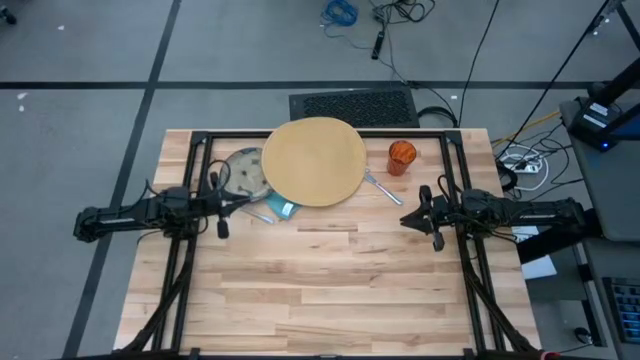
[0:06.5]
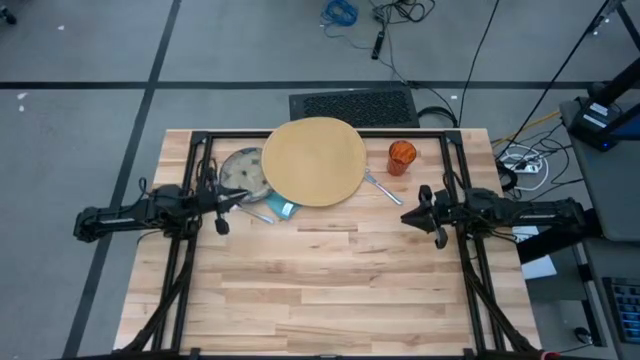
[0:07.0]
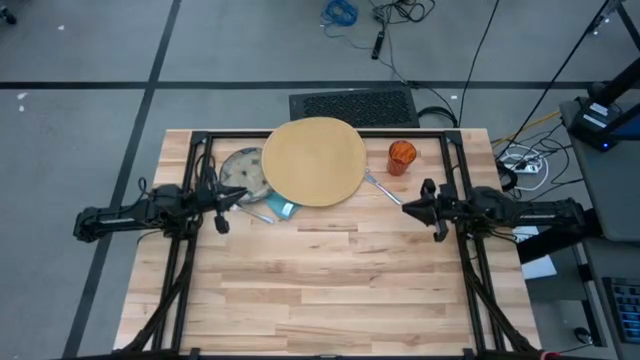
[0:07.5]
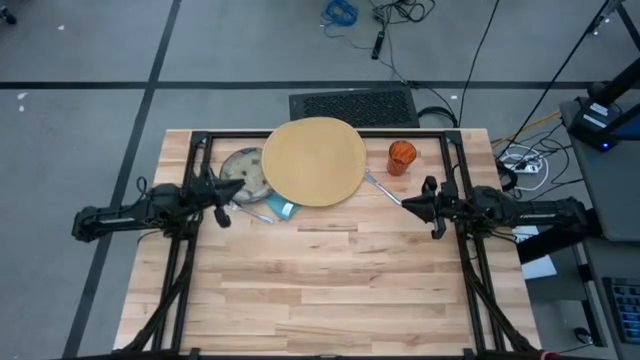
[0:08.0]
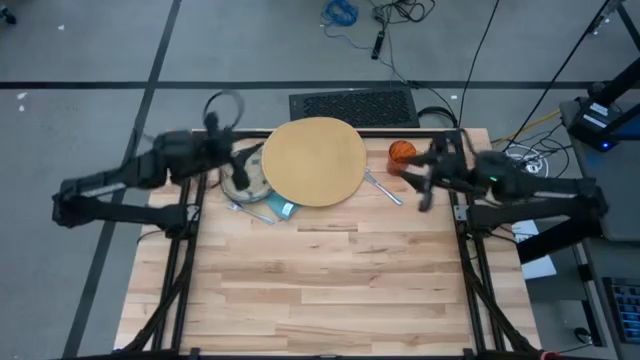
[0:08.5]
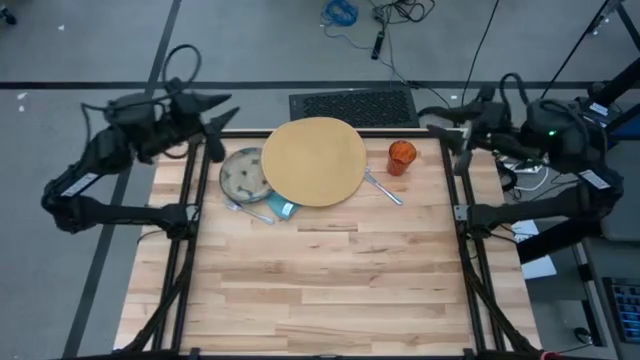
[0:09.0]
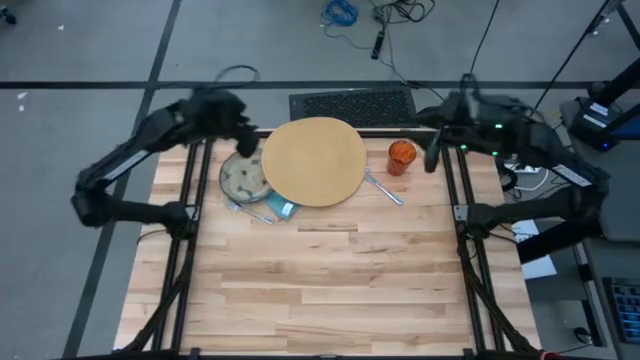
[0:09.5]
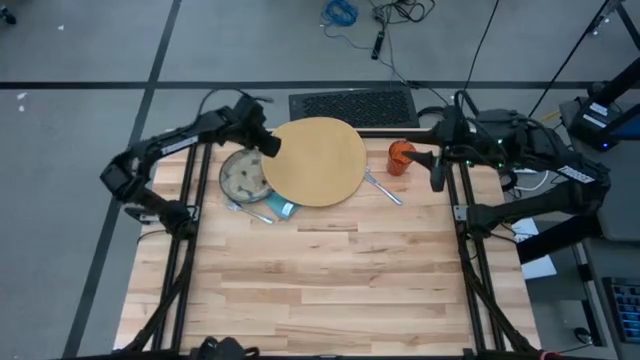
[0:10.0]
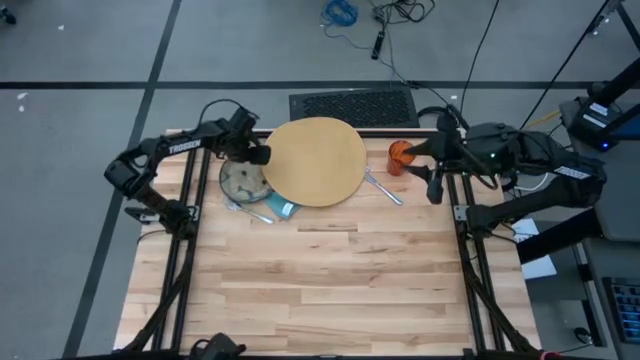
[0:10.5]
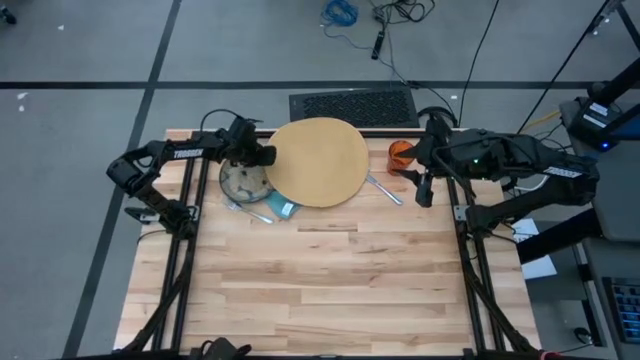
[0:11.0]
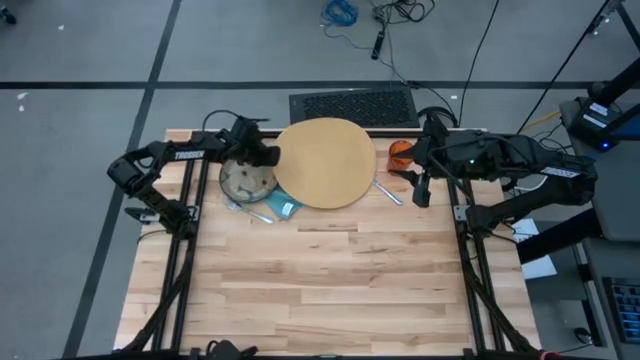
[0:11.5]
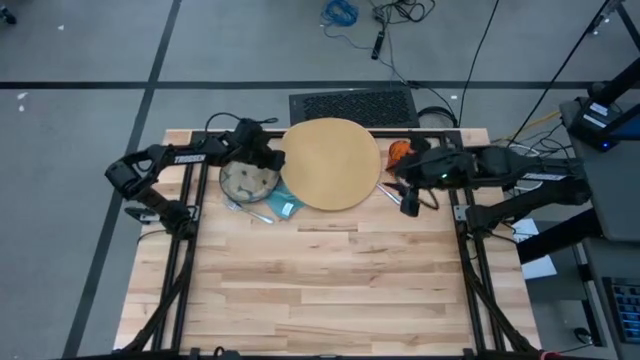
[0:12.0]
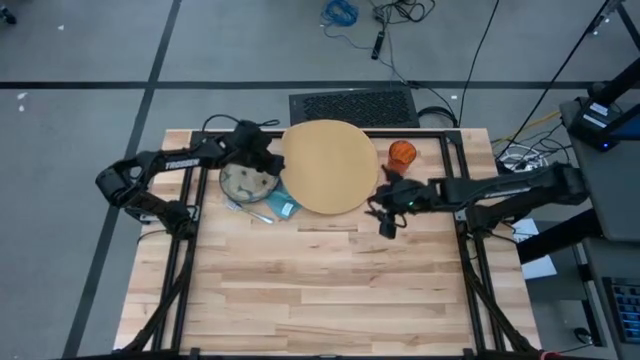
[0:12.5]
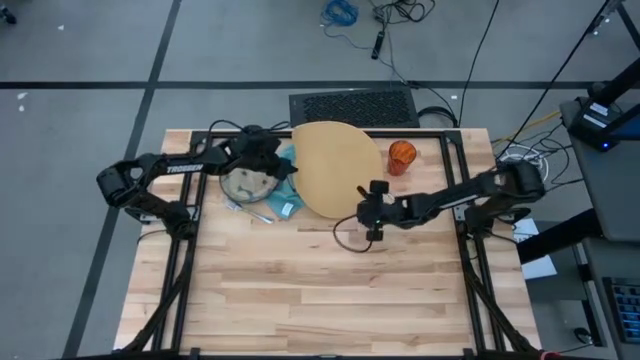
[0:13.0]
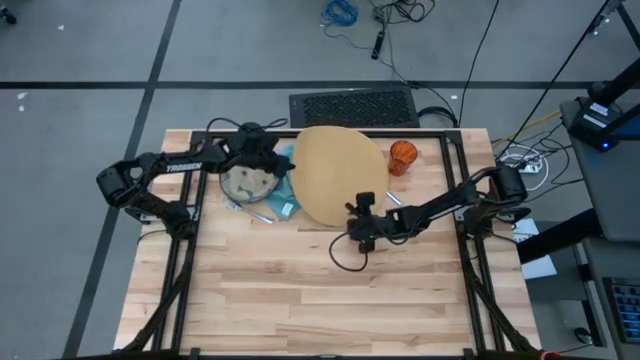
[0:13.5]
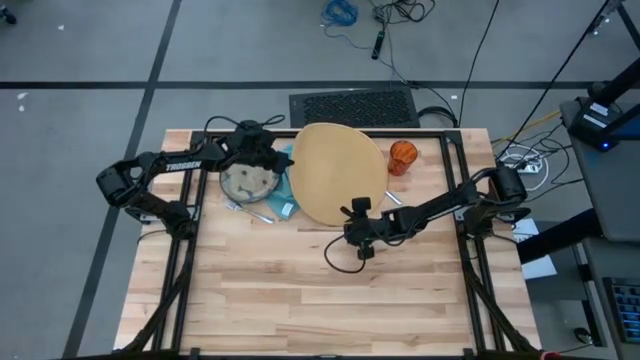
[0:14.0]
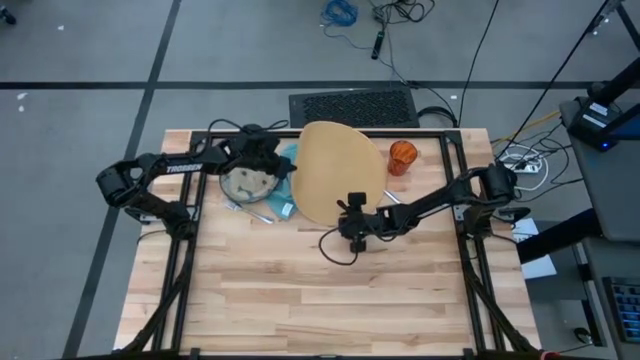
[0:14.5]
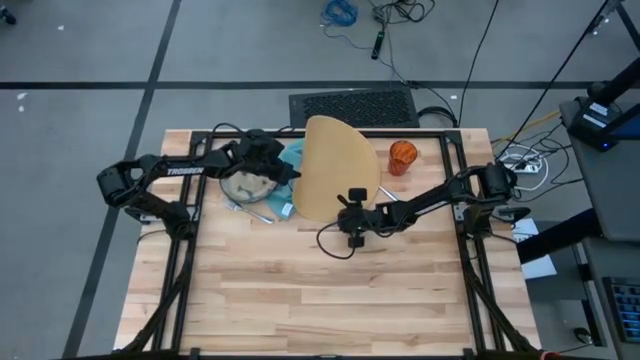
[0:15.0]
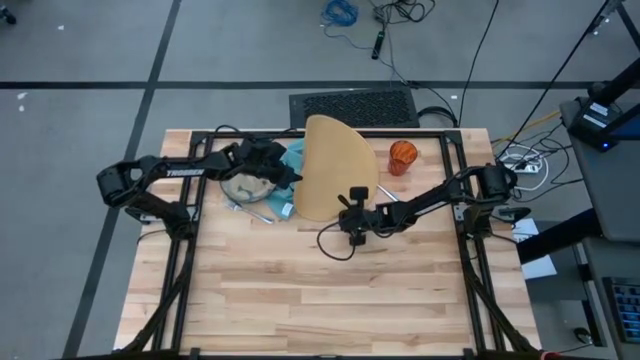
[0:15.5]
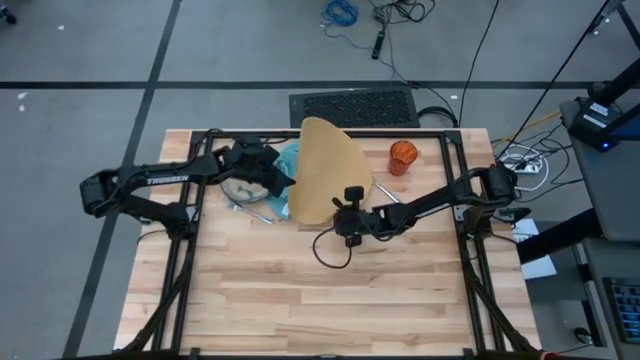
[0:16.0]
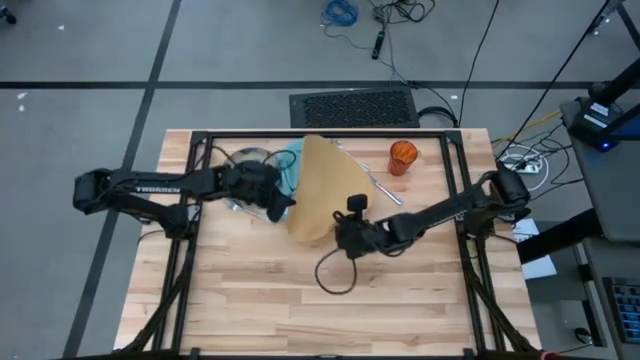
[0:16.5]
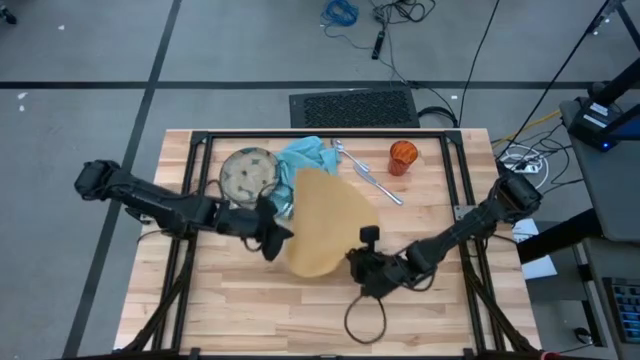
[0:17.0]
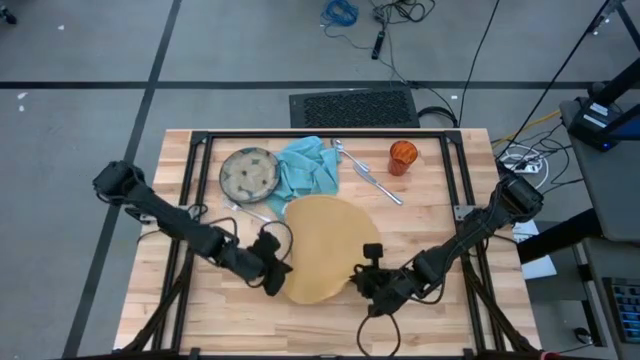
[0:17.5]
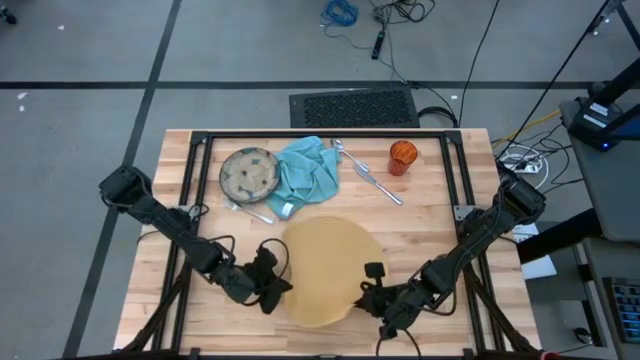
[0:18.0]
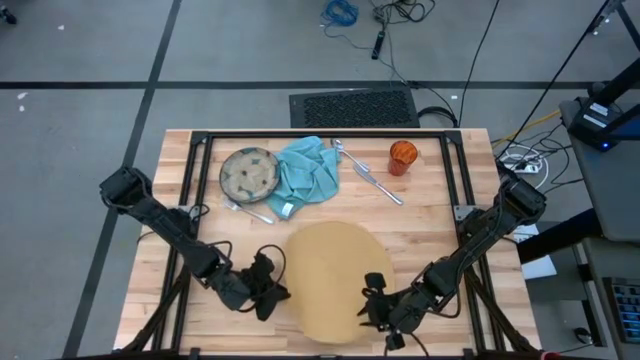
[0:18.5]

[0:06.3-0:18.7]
Task: Set table place
Move the brown mat to the center of the table

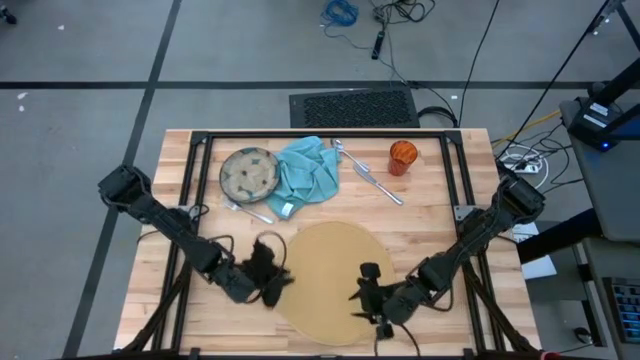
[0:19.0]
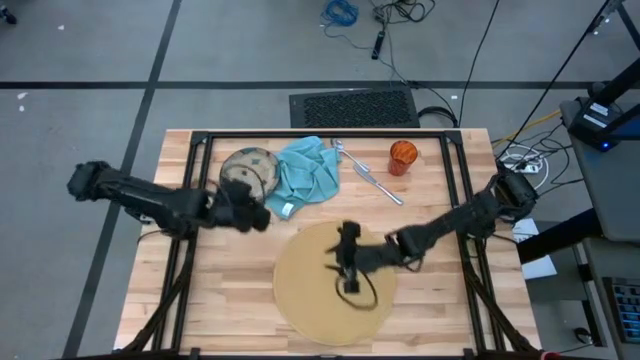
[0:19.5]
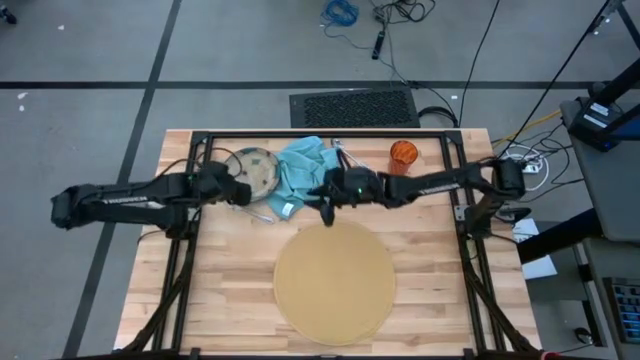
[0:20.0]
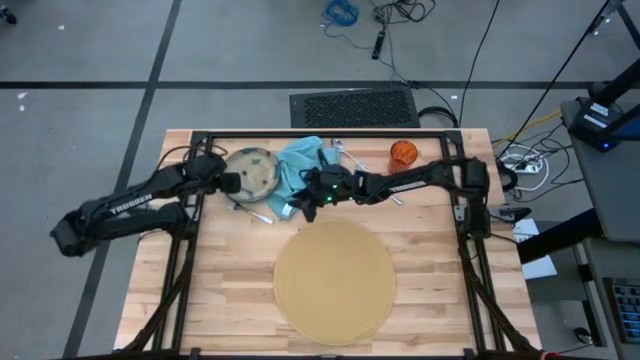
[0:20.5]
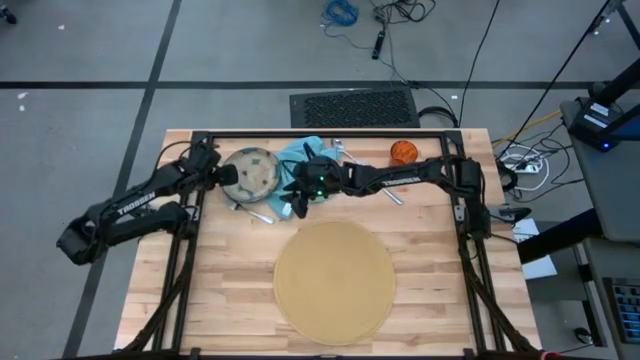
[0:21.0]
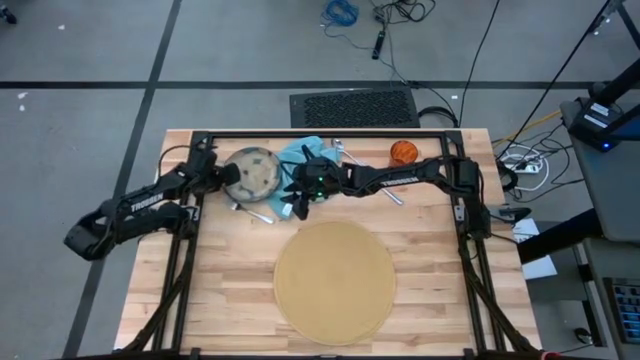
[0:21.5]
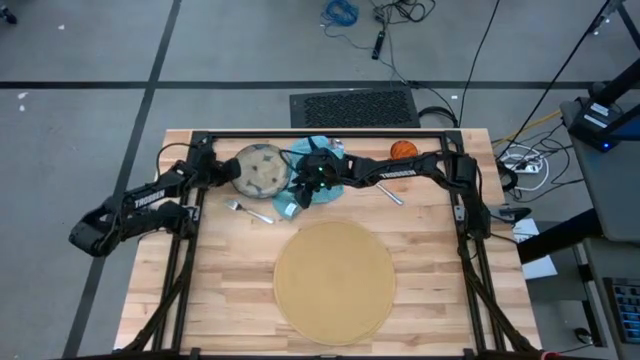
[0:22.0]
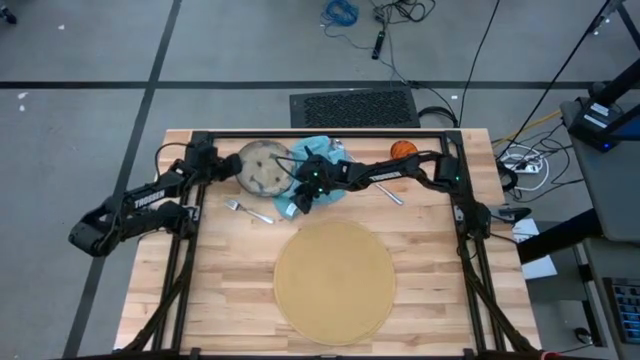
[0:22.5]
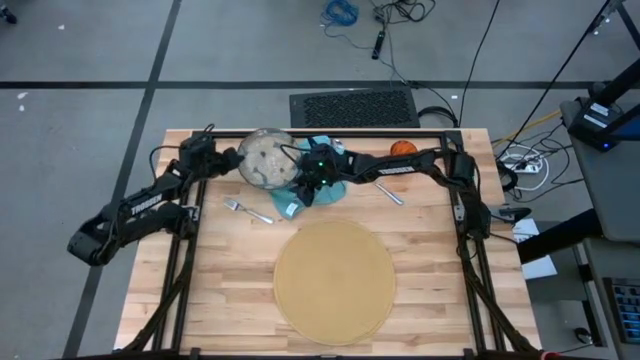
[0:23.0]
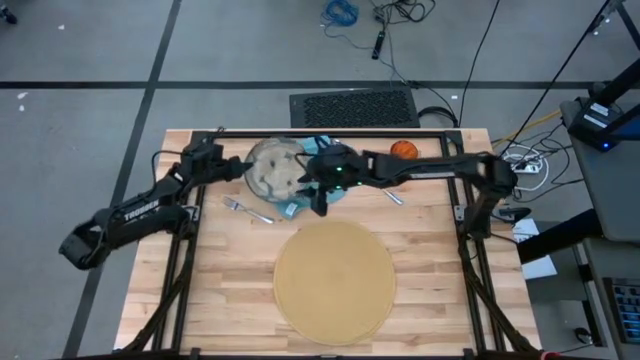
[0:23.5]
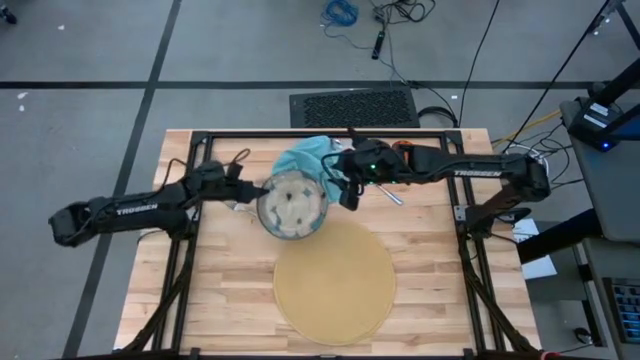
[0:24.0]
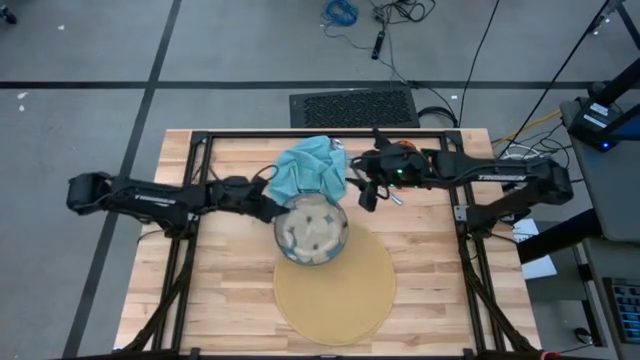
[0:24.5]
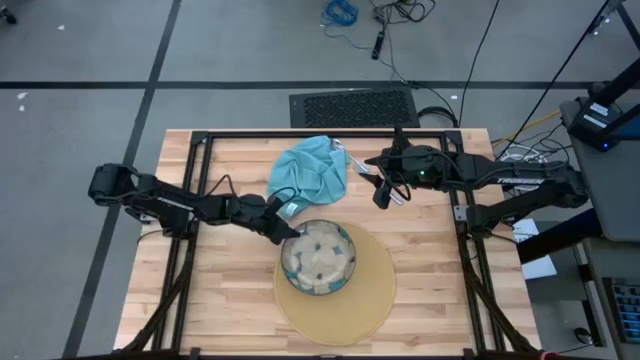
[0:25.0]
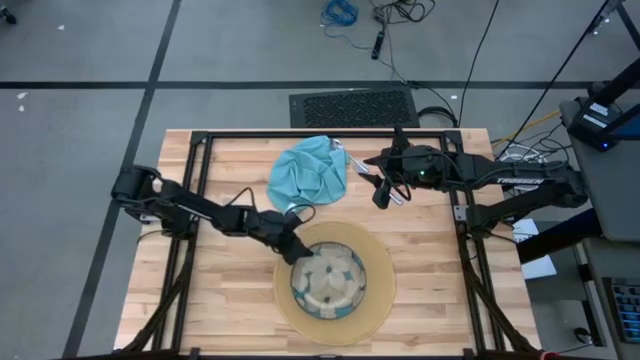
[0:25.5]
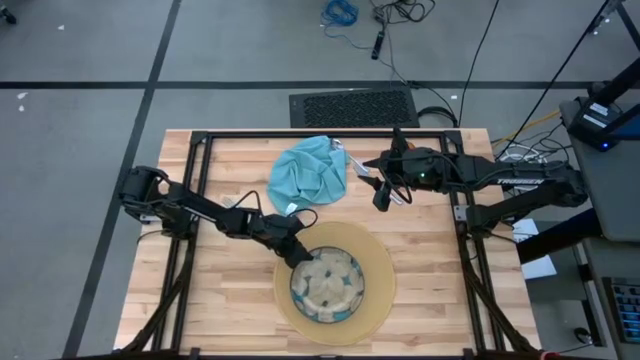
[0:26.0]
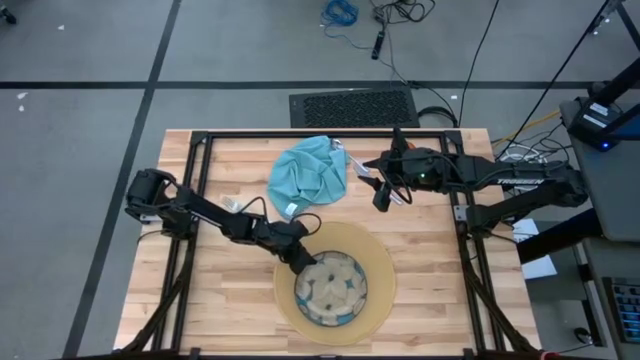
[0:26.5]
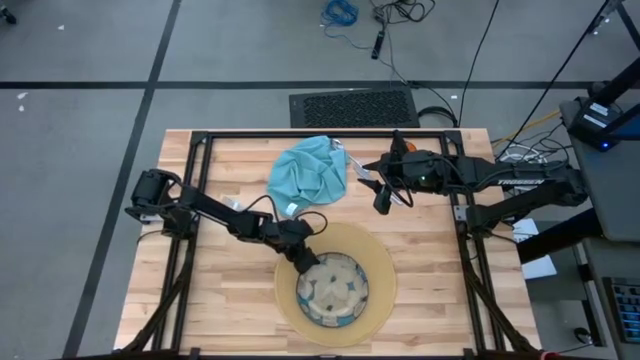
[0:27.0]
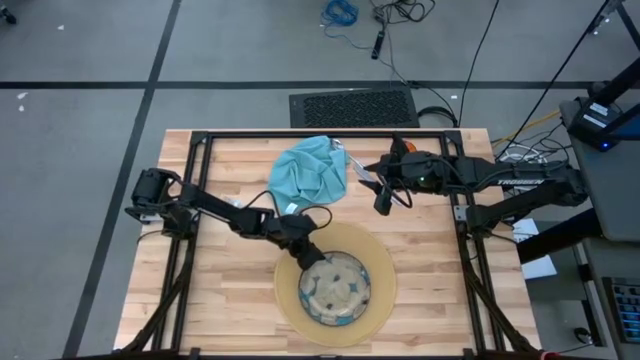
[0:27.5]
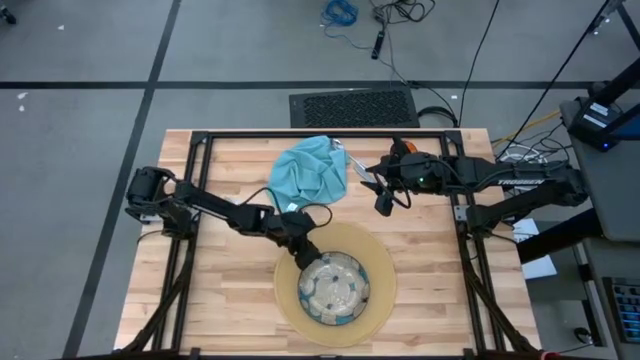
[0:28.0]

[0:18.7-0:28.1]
Put the white floral patterned plate on the brown mat
